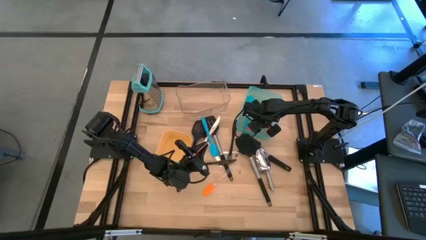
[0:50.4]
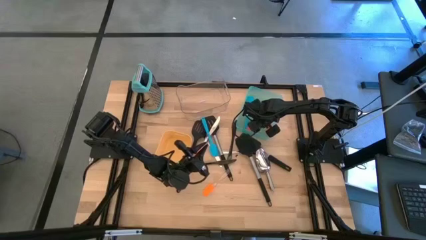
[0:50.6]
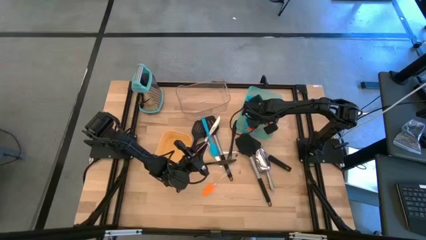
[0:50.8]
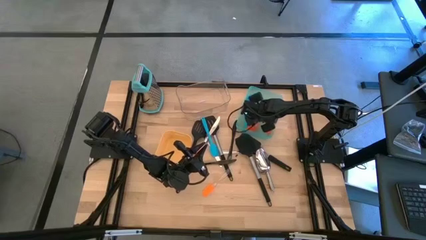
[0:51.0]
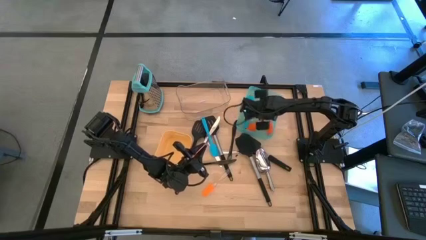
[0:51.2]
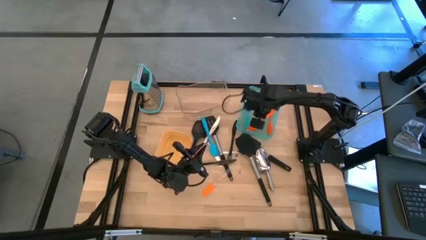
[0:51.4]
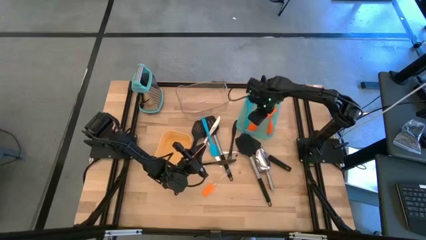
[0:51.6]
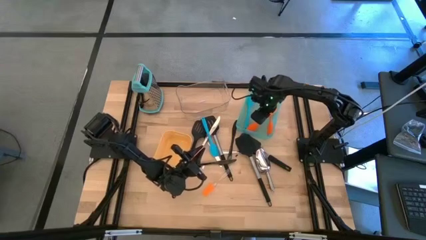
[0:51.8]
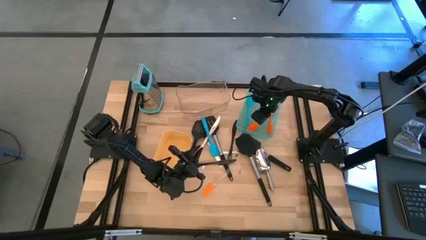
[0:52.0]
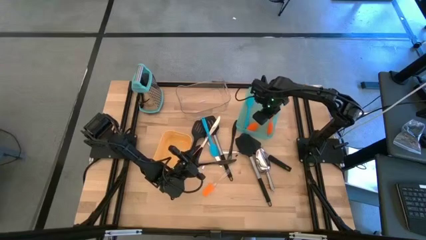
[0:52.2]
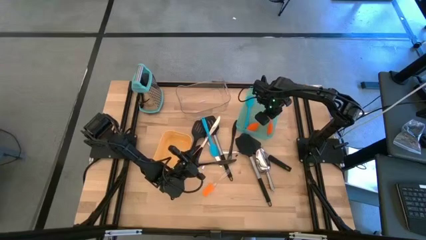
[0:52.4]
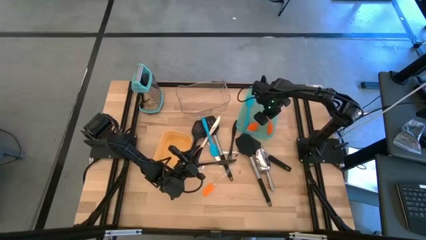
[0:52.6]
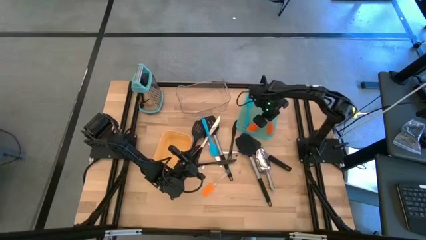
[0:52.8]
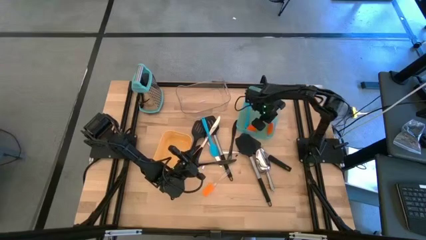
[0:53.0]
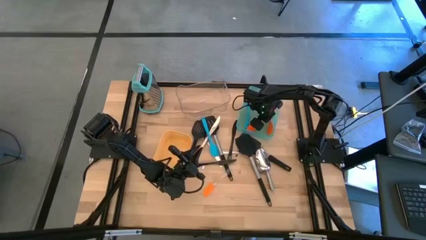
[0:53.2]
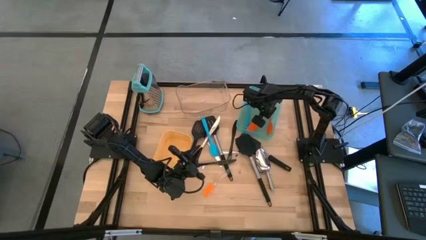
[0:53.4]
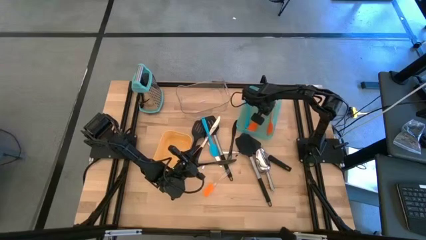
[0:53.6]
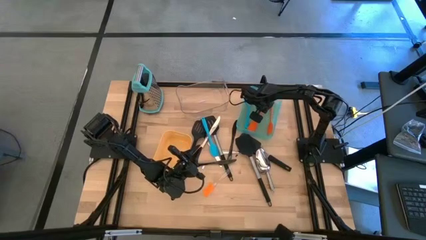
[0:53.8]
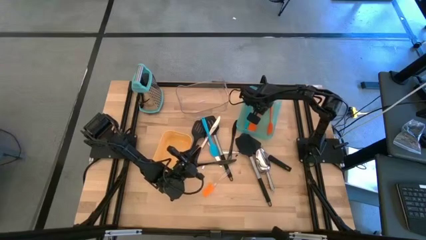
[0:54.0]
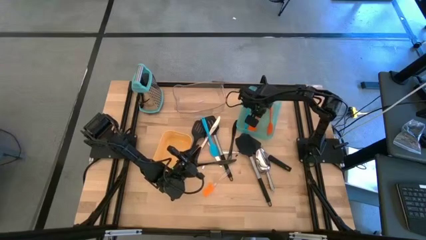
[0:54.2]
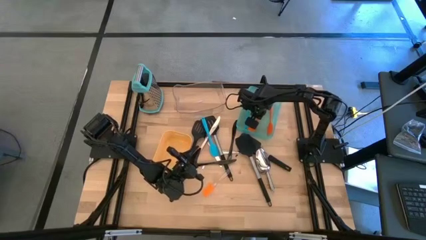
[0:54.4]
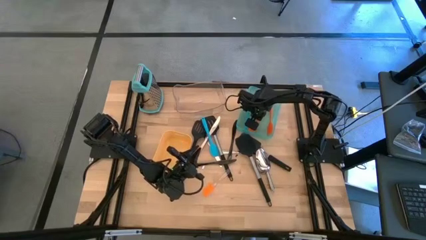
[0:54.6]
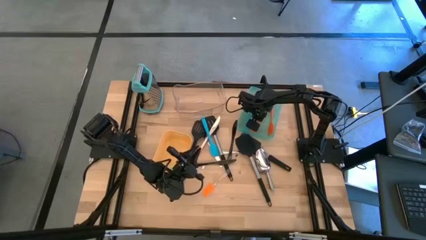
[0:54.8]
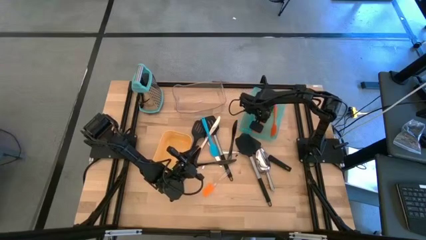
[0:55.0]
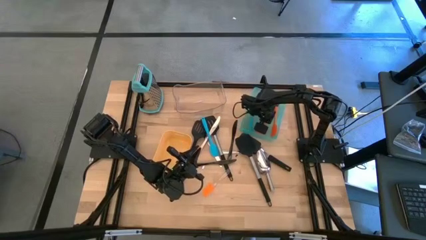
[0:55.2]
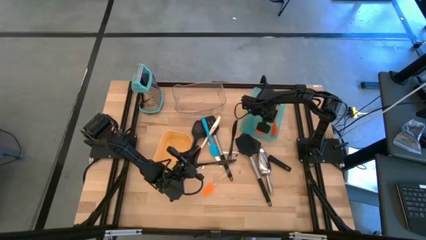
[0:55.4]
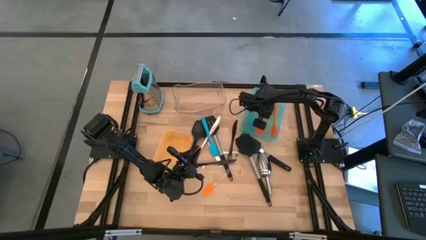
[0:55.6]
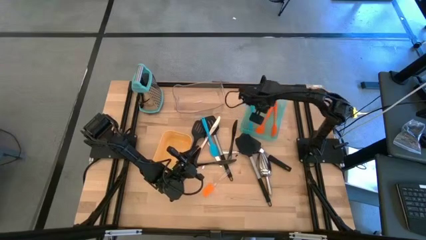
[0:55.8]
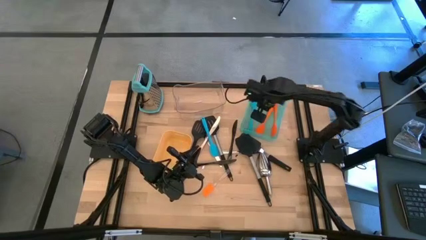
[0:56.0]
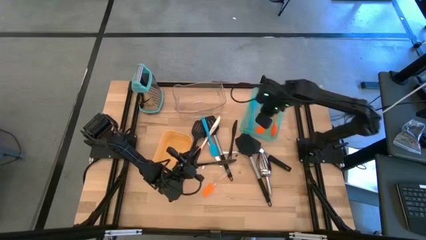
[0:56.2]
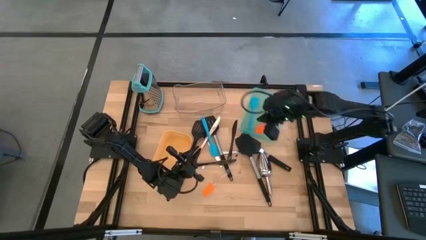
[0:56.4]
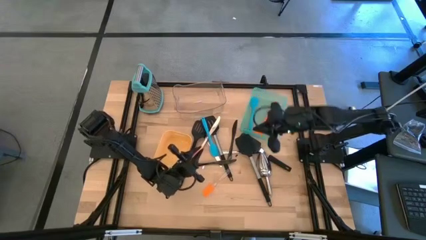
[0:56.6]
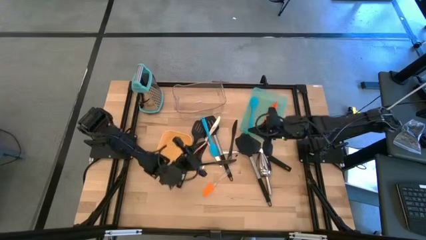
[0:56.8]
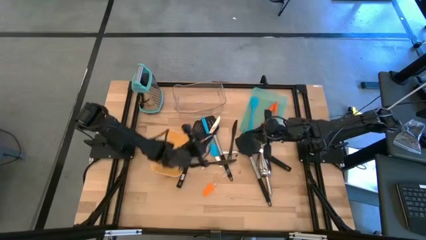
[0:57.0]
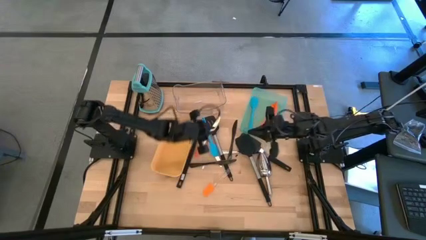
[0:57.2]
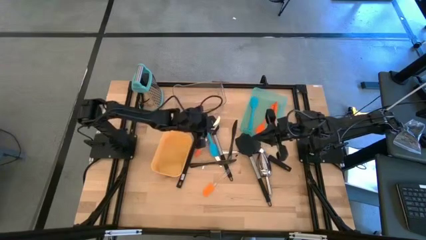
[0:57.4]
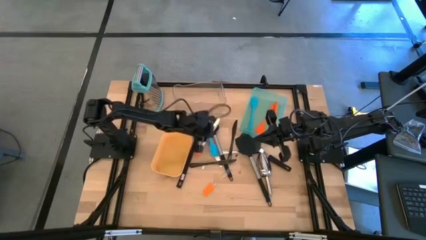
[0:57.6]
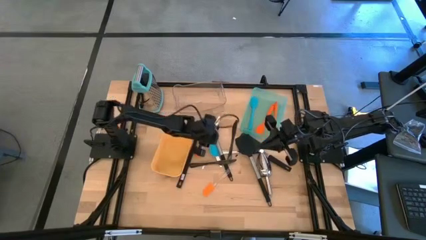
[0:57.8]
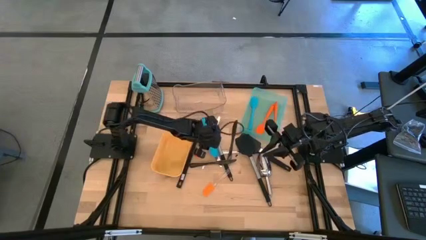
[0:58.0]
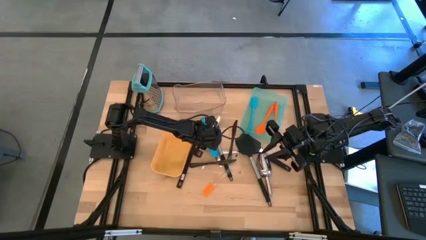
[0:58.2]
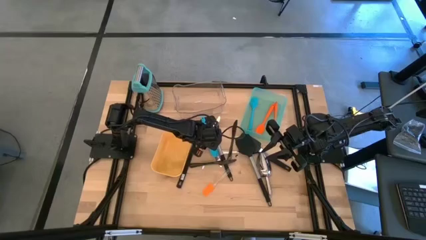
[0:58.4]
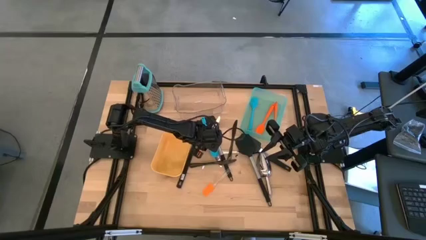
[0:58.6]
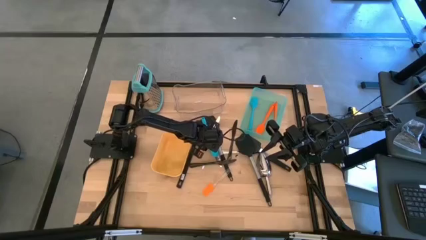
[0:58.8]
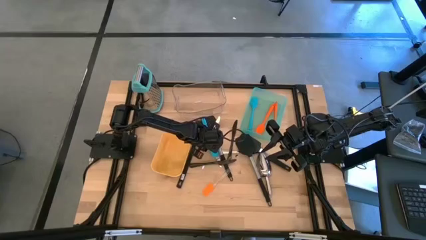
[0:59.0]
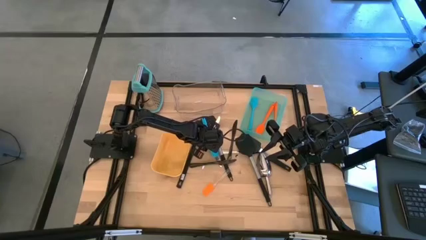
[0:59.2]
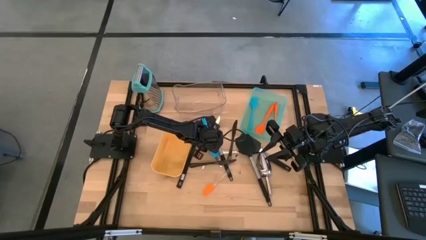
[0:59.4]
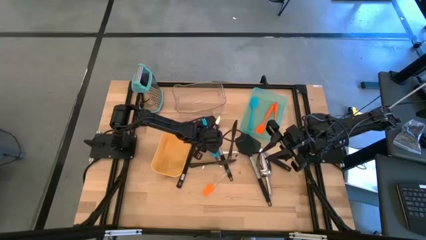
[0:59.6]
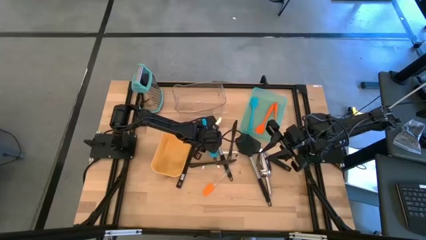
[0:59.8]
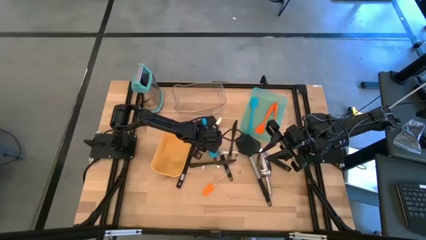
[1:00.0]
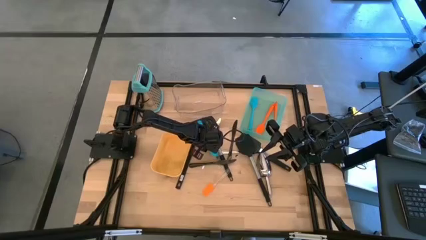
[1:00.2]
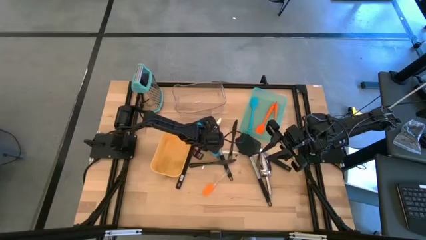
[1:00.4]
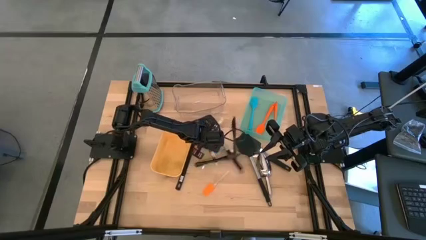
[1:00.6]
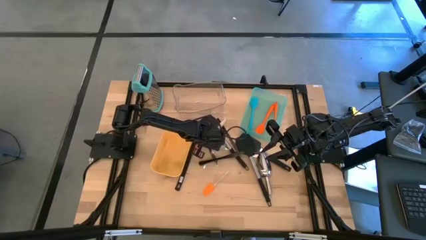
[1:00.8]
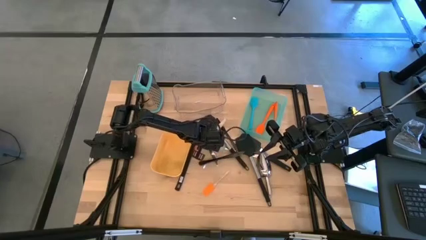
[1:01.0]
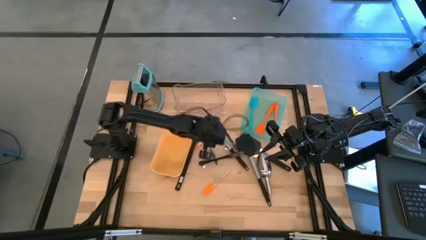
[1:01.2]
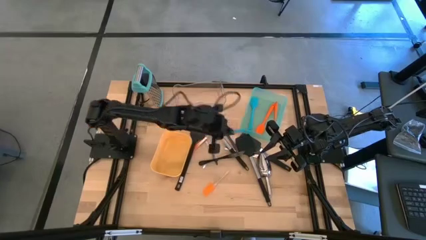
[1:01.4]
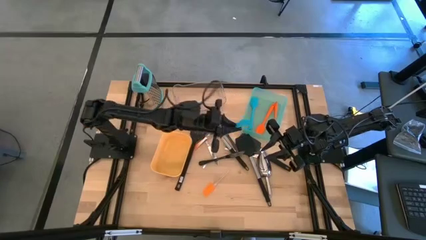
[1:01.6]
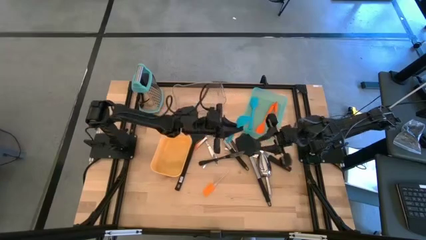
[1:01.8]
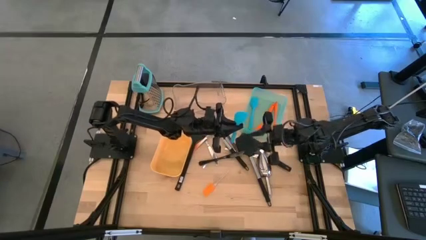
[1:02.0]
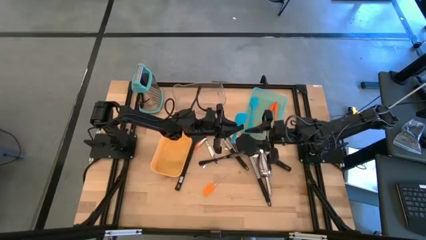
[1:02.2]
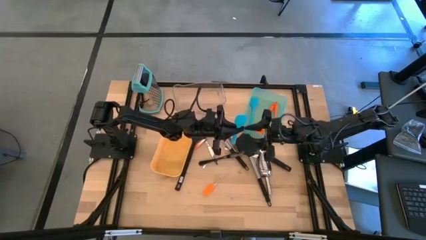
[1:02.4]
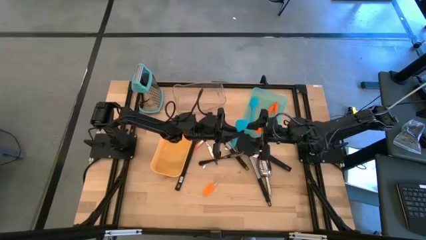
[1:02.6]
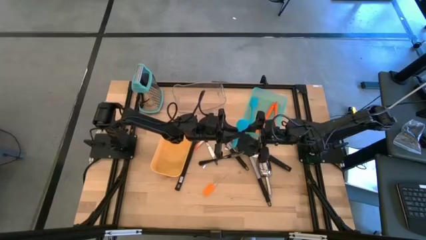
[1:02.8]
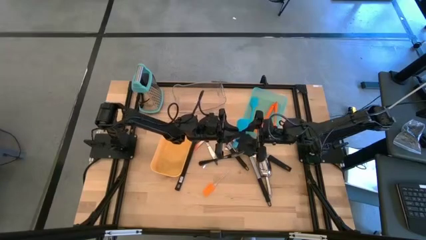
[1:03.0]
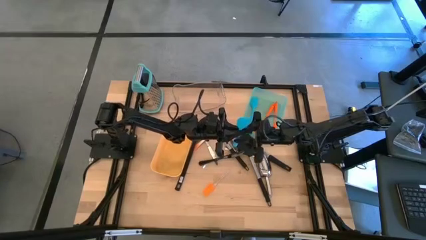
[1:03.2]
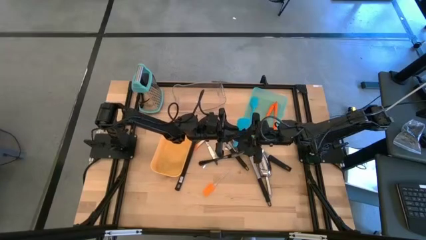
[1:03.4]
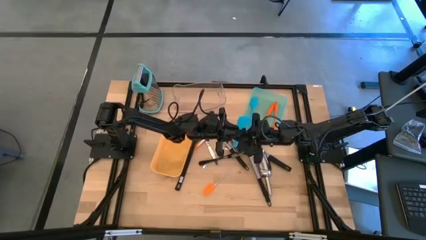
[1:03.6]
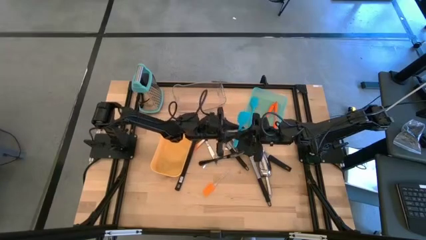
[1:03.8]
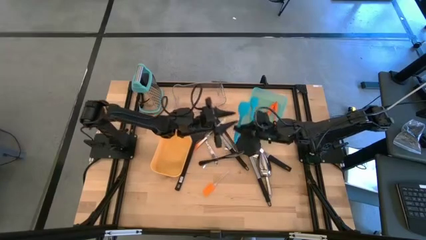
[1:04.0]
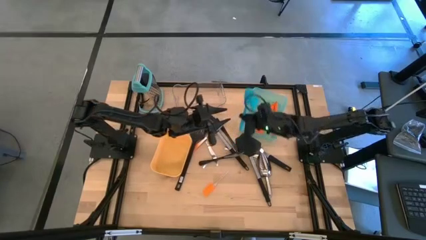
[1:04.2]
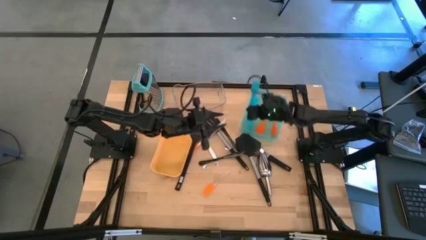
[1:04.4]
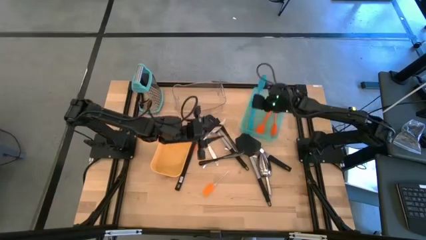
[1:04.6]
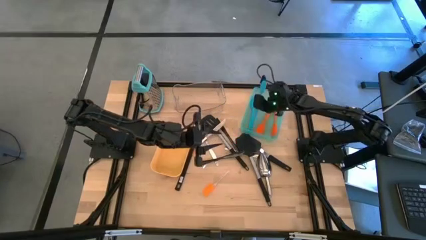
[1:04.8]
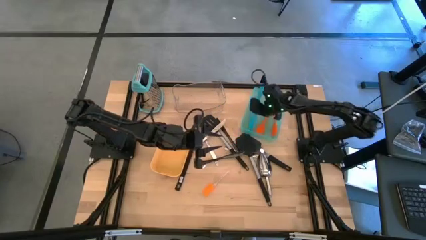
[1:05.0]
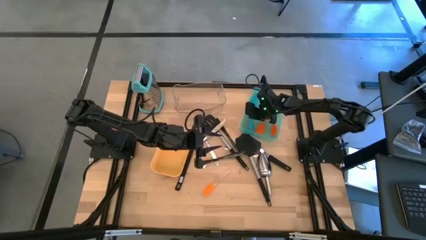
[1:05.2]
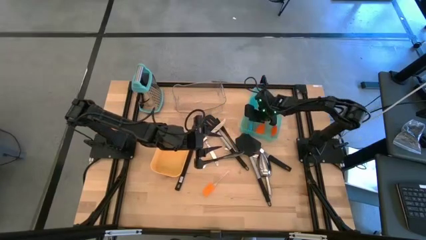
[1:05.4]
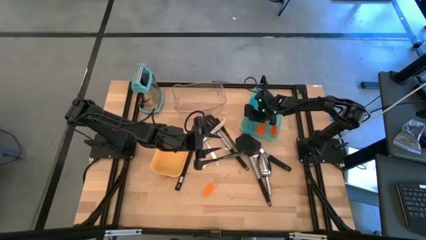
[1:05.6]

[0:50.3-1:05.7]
Task: Pick & Place Kitchen Items
Put the blue spatula into the green bin
